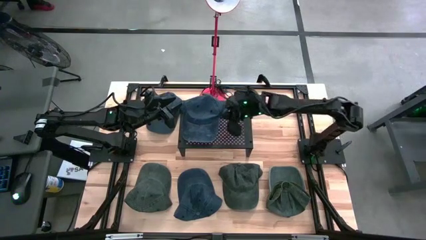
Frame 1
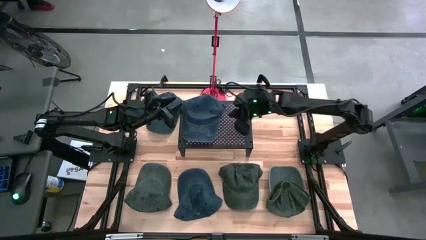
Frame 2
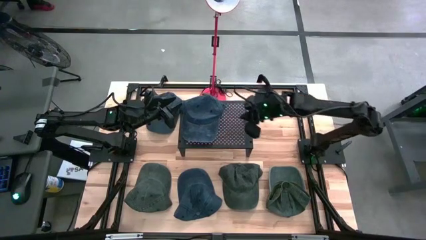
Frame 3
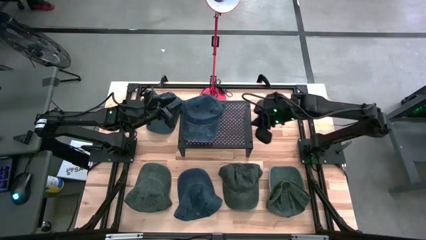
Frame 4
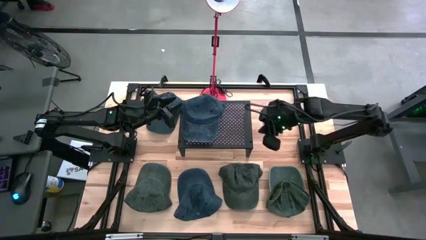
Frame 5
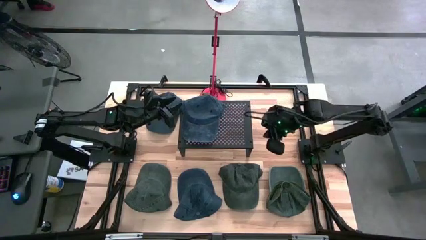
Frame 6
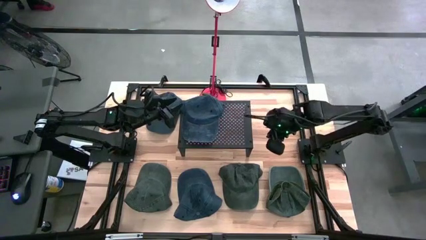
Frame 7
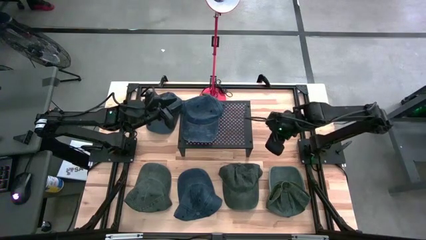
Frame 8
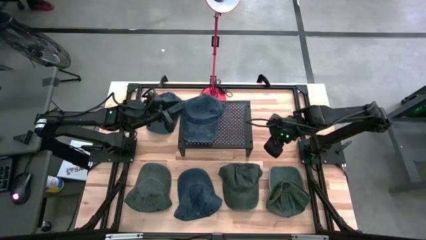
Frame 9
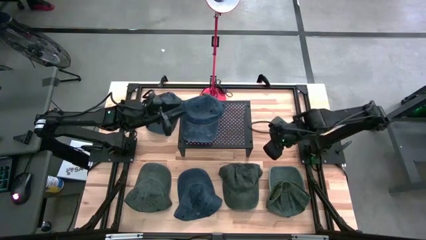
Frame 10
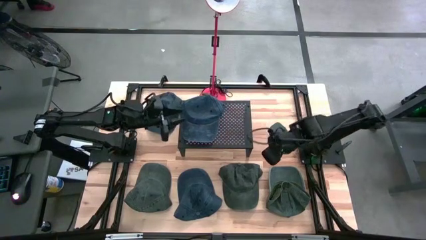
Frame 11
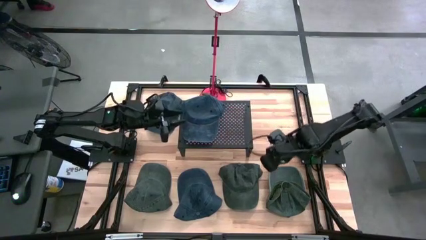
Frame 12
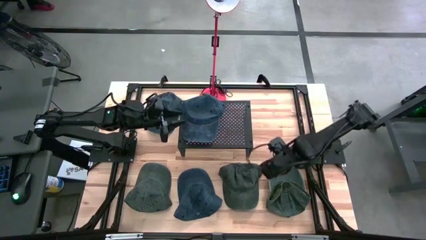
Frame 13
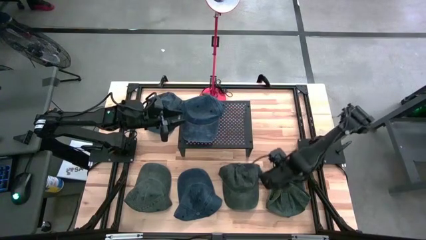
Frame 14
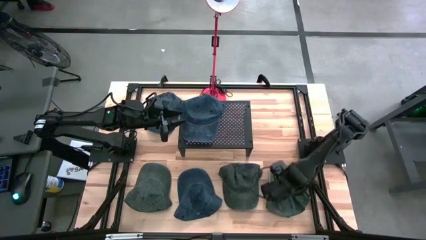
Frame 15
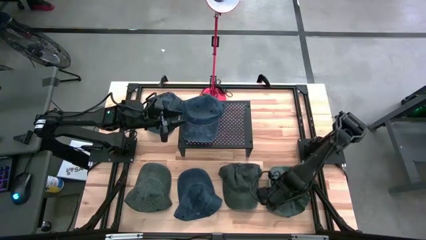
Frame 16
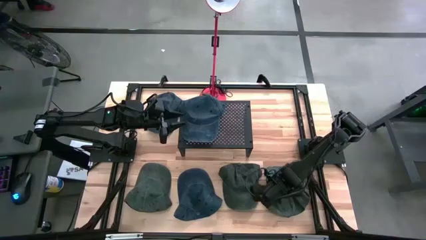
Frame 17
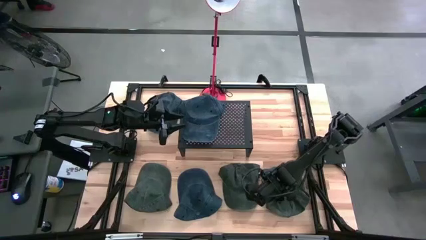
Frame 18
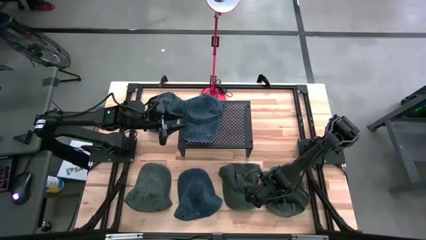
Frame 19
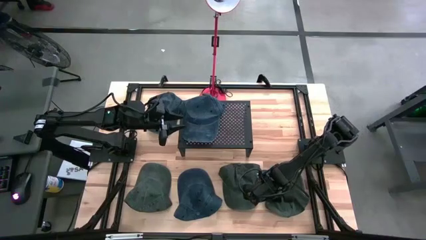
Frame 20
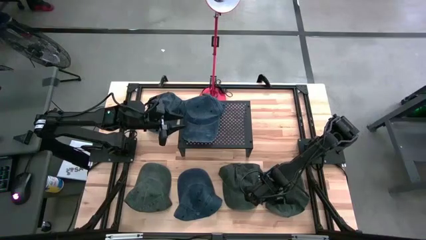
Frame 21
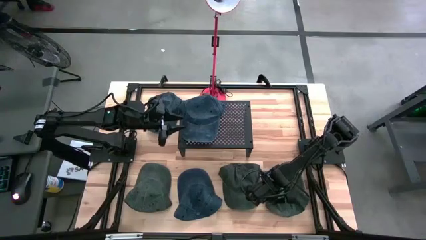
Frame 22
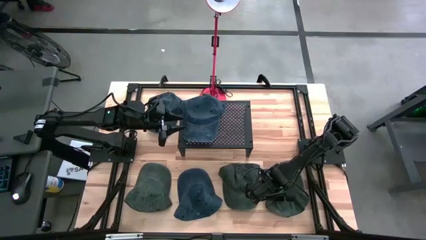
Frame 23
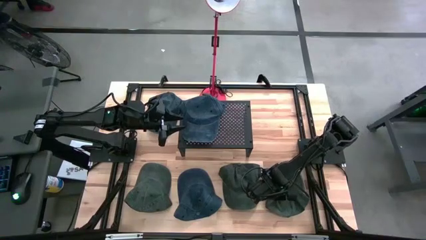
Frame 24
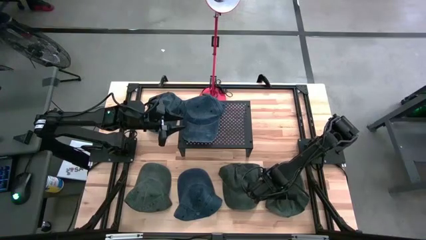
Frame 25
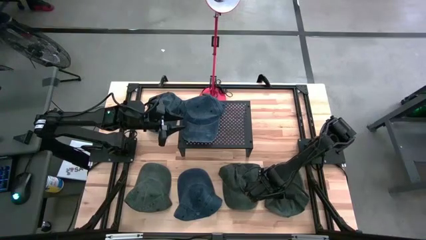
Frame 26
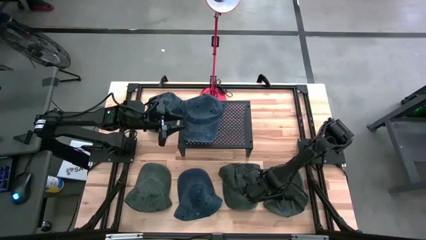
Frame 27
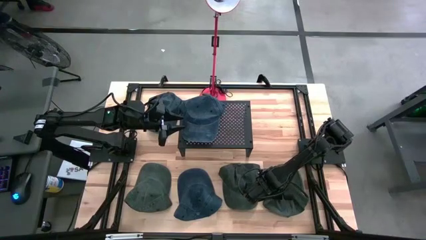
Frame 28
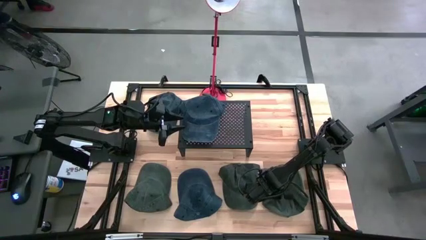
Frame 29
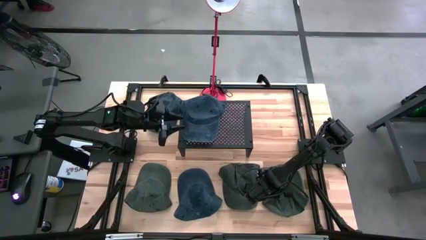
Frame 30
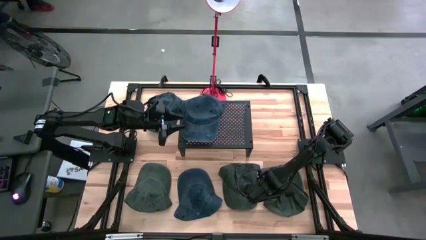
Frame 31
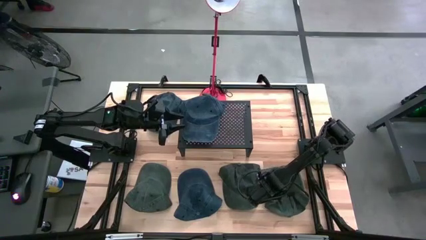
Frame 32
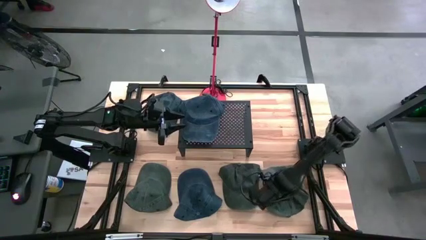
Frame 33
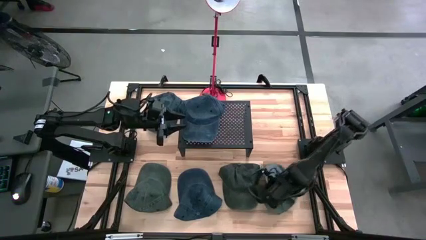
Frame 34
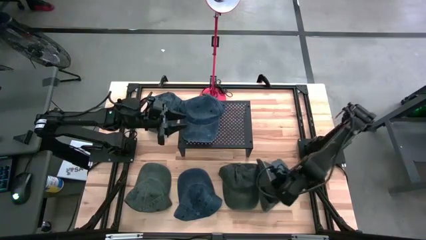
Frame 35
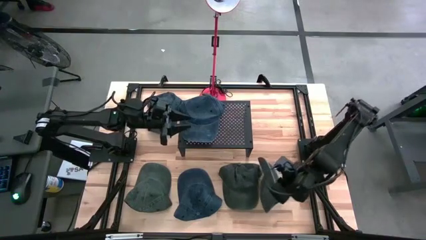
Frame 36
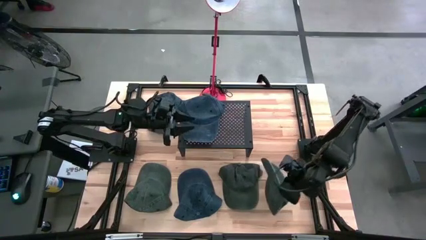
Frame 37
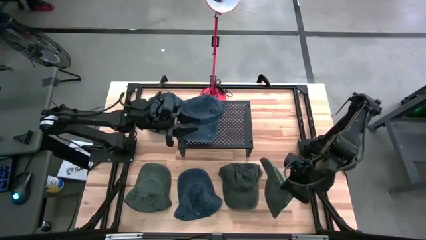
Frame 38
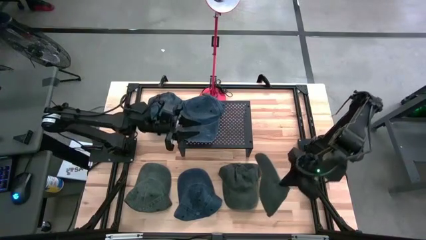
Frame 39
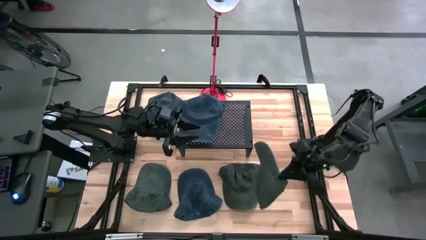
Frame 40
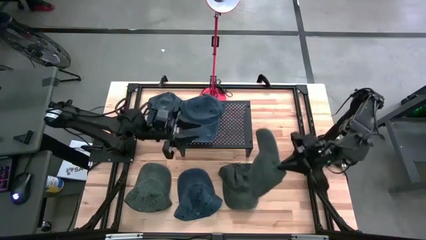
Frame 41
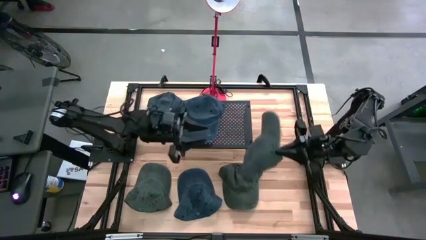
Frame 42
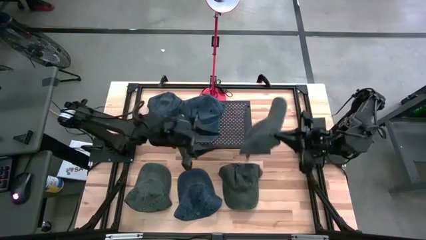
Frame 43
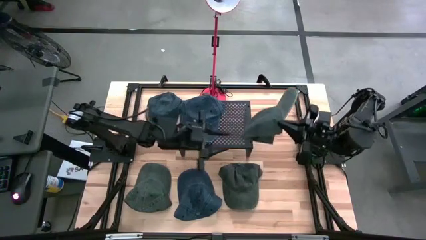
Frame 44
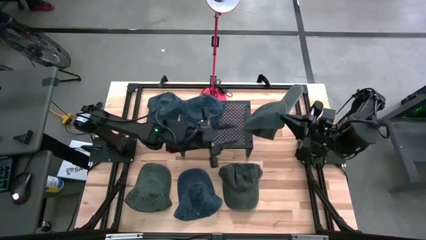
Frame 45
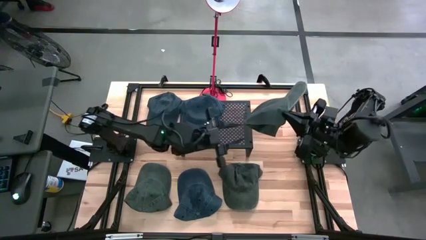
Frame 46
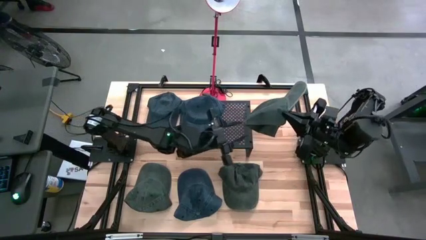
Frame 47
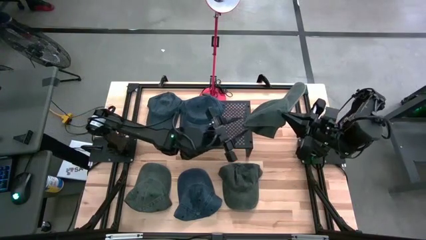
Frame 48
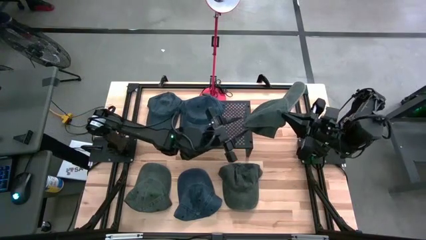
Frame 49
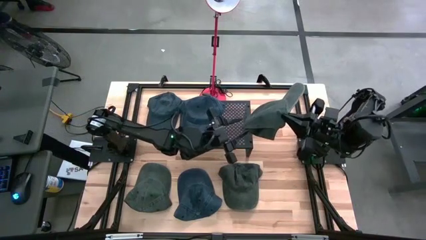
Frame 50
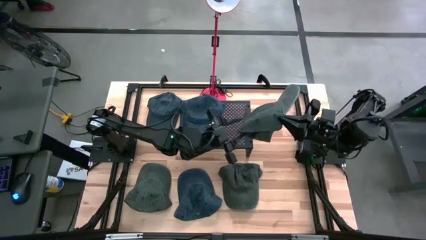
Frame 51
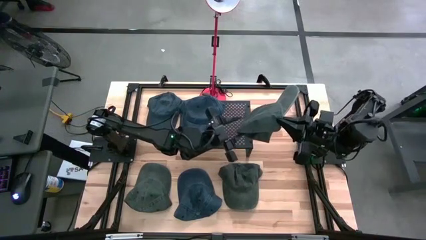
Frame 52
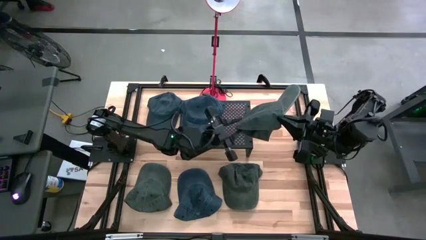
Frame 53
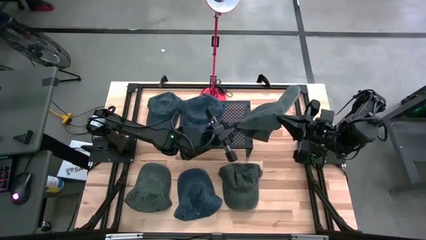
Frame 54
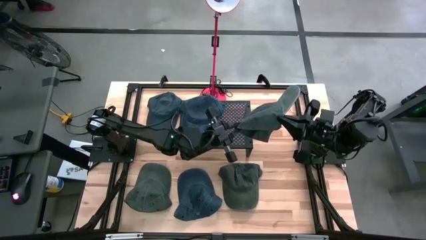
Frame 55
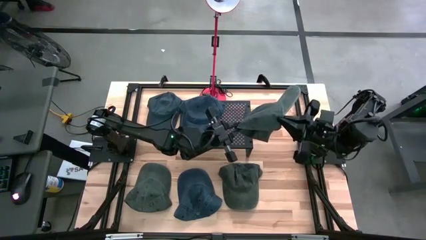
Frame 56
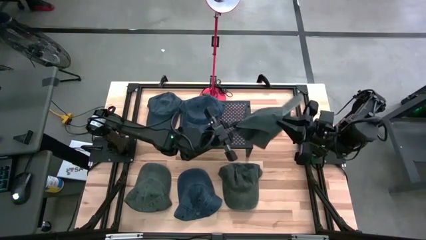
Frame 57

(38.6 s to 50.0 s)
Task: Pick & Place hat
Put the bottom right gray cap on the shelf
